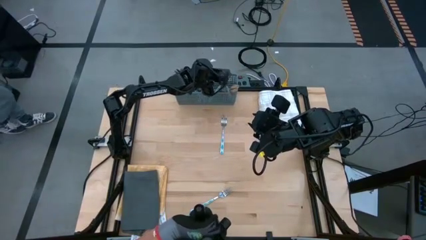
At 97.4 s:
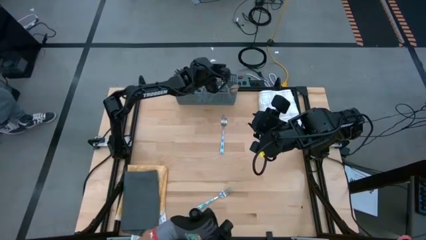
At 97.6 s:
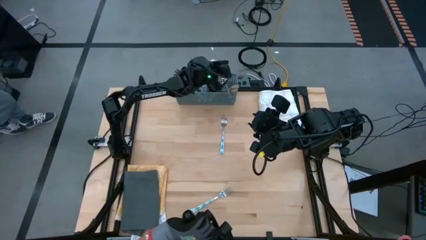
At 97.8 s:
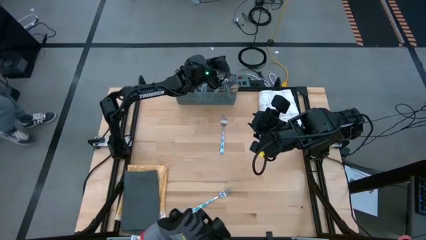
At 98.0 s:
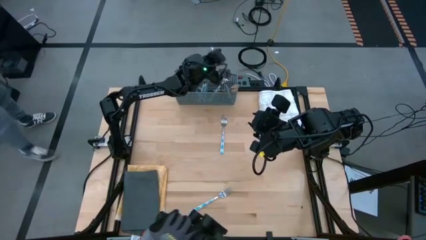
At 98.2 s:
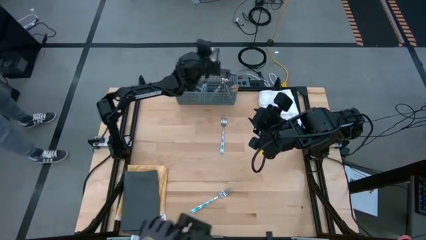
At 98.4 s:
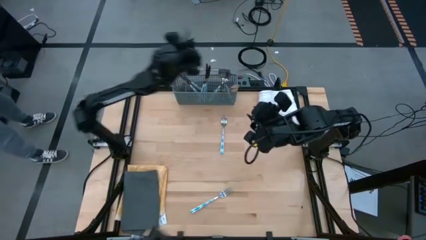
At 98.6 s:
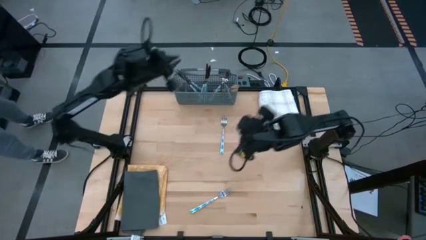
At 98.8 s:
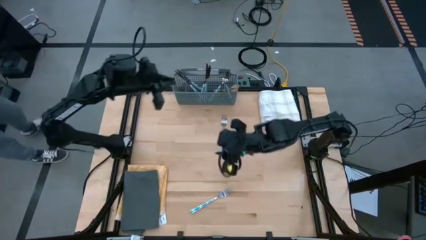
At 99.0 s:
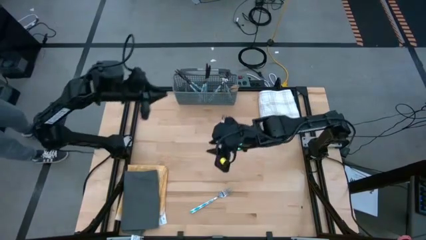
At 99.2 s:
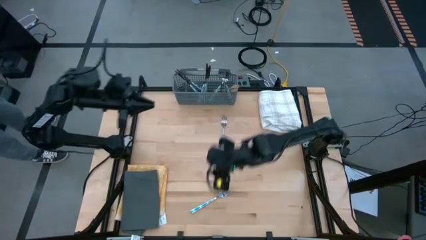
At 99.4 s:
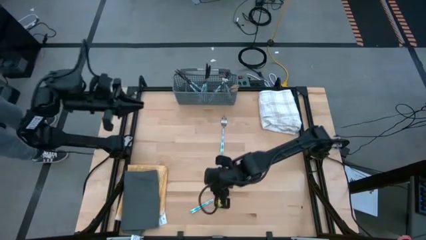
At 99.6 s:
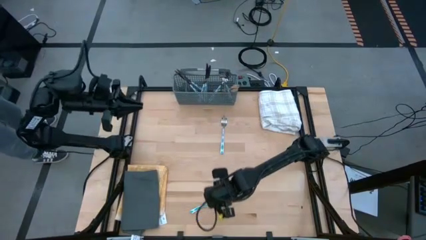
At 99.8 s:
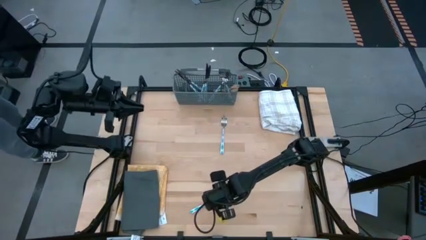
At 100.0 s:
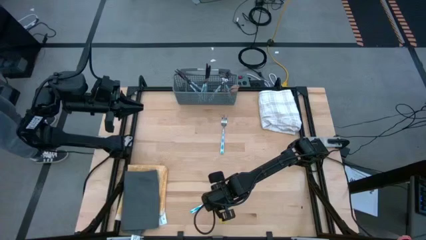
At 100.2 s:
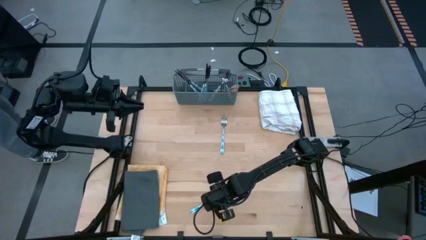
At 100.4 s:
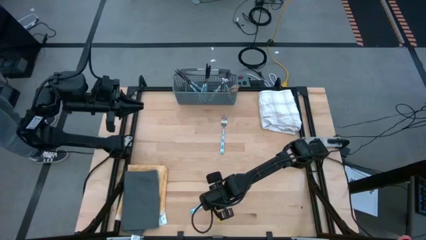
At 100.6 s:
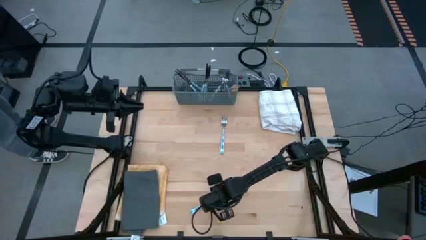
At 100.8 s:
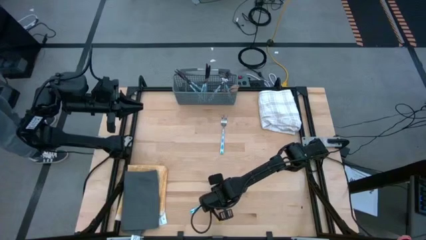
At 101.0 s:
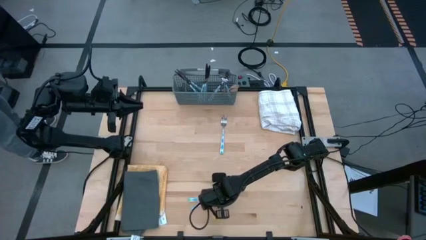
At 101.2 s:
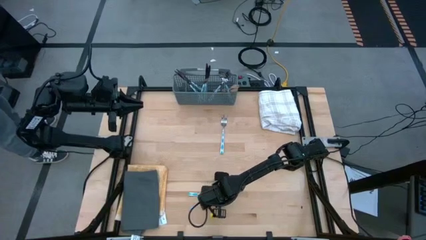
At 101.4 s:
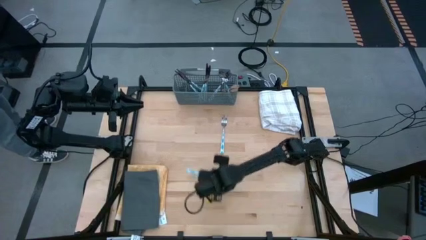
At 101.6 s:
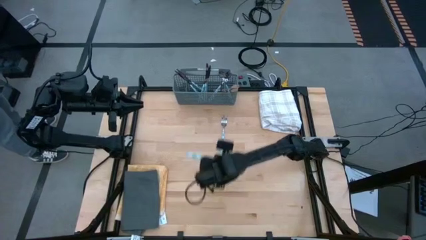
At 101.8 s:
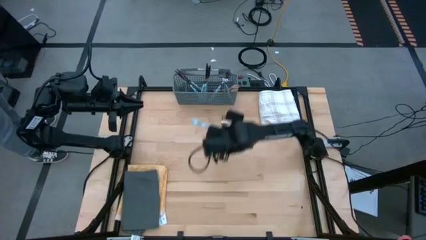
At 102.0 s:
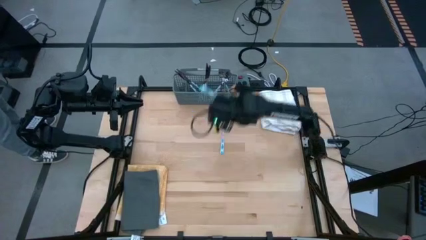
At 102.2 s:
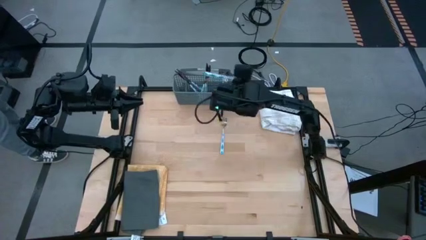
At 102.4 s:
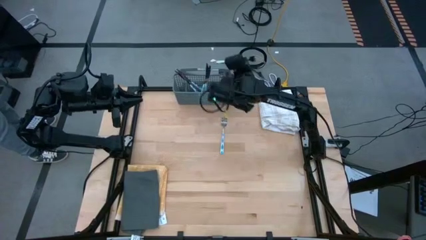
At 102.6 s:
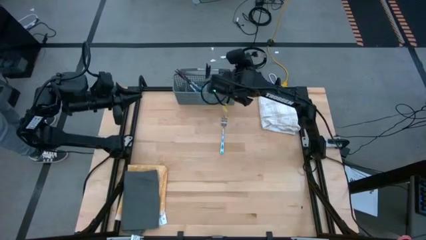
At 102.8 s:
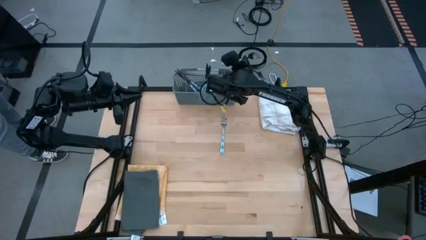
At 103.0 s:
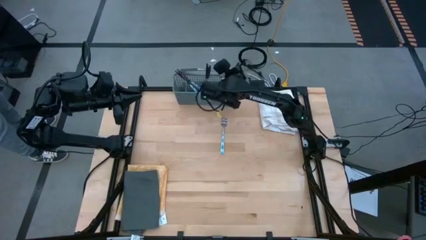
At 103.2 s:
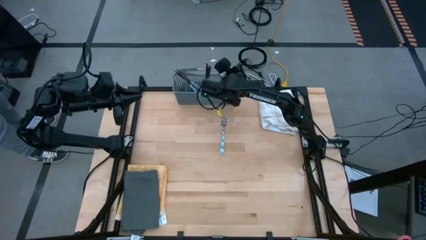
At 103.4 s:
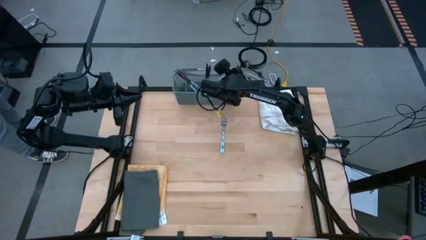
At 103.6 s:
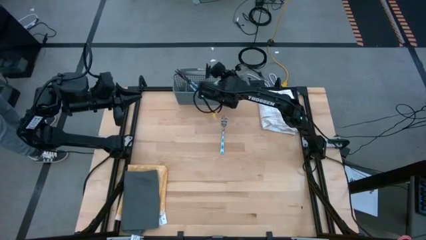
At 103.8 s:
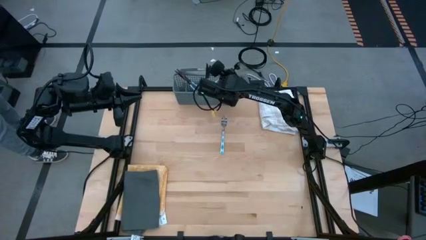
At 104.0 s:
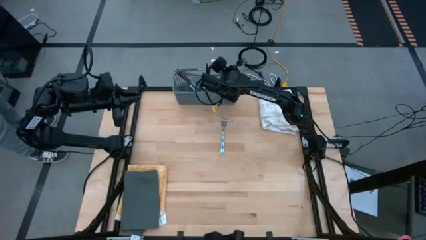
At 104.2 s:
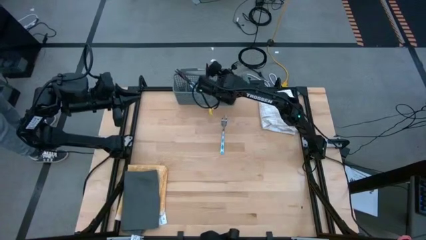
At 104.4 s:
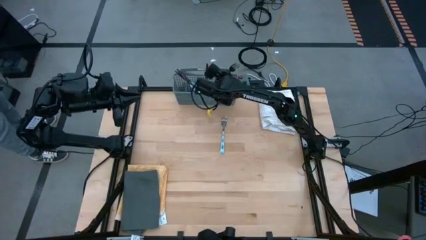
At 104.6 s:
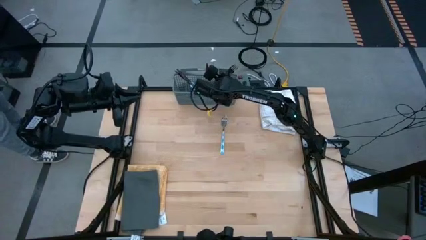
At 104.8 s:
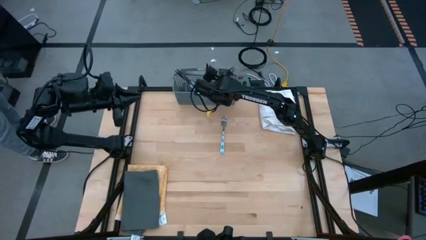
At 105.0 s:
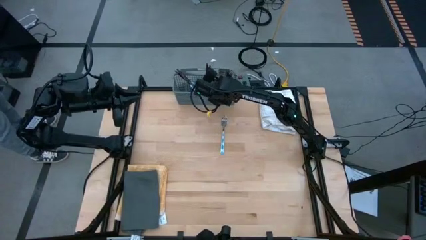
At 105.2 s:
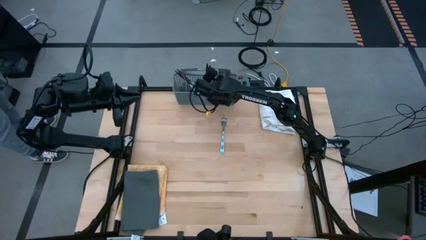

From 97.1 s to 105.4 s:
Task: Sort silverware
Put the blue fork into the gray silverware rack

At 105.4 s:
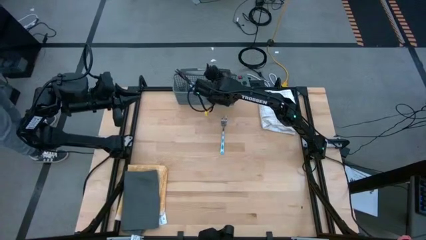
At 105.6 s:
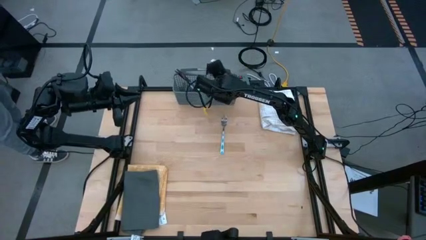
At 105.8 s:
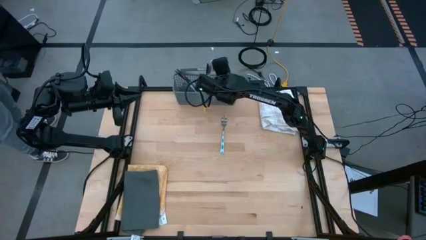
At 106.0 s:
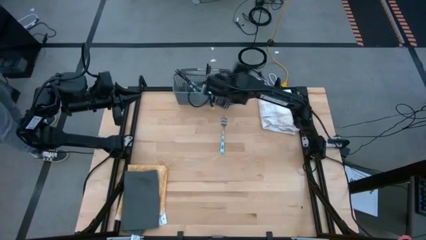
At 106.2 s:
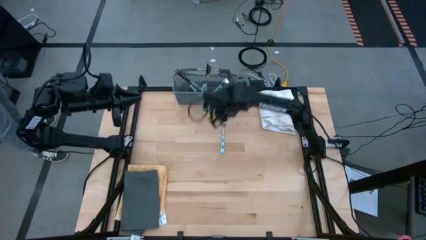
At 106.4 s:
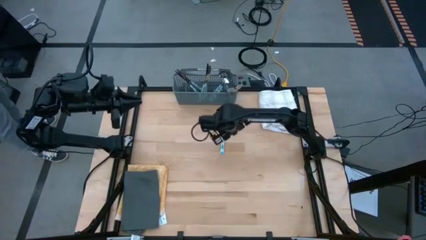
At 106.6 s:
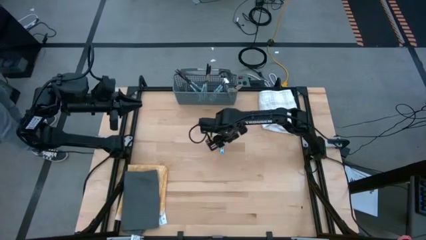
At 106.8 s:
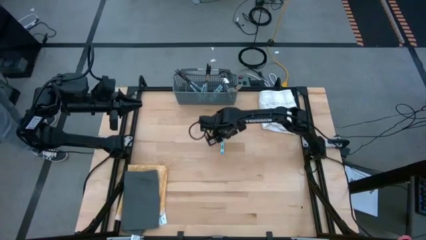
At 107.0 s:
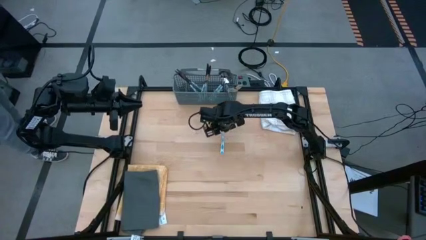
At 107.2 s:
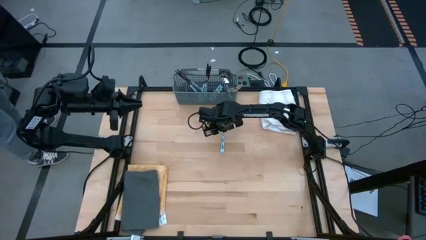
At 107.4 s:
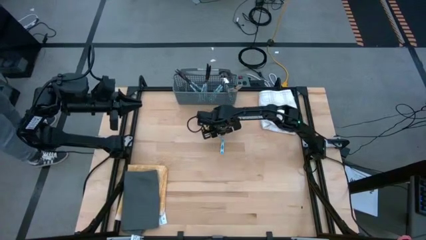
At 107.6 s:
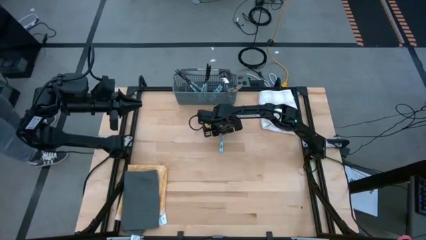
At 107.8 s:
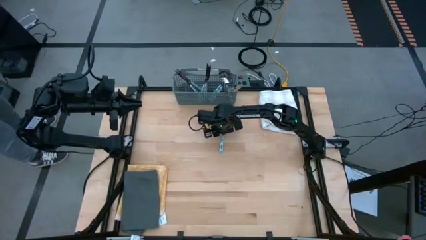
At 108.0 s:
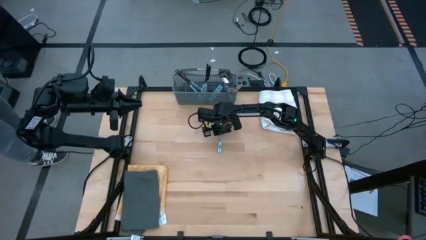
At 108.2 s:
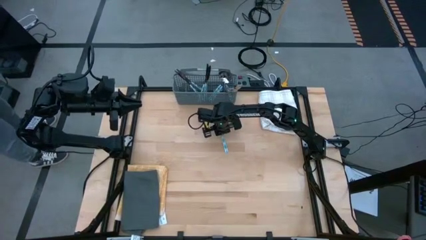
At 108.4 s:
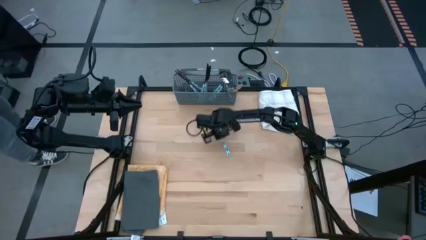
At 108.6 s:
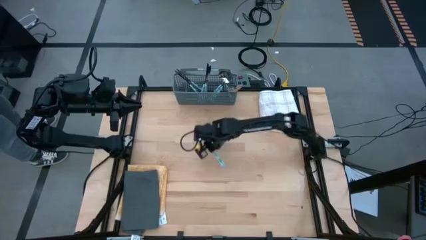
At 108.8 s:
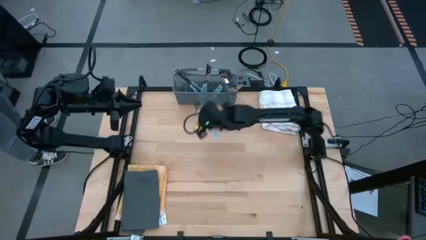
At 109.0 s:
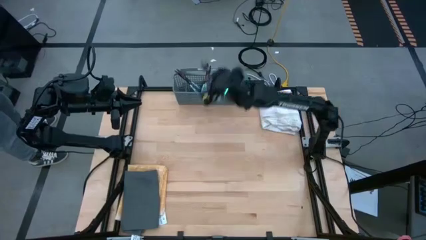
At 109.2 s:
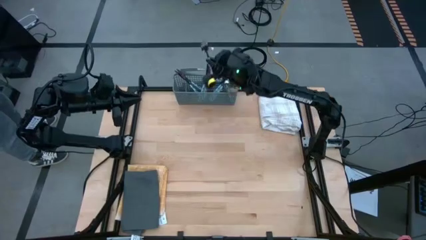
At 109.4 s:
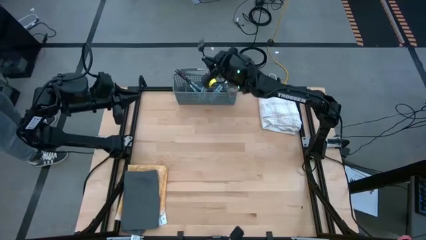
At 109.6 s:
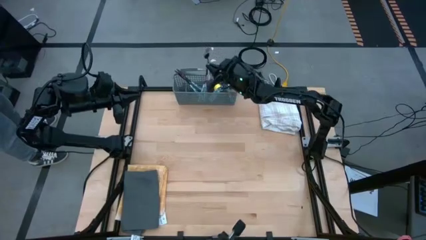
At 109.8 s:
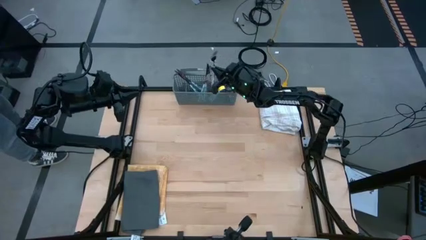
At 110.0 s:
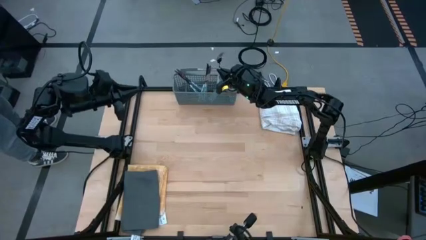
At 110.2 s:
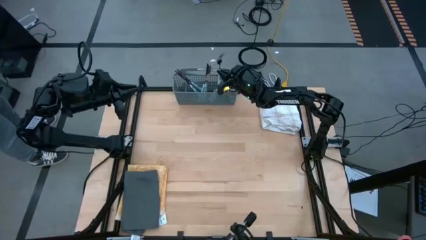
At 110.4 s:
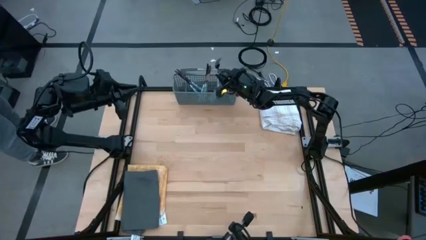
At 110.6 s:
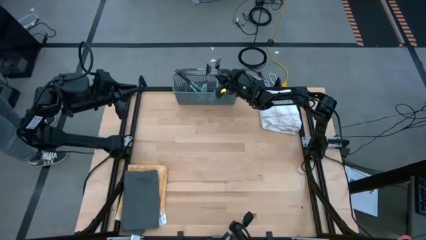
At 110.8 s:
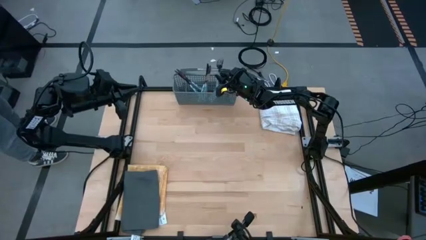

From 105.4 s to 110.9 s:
Put the blue fork into the gray silverware rack
